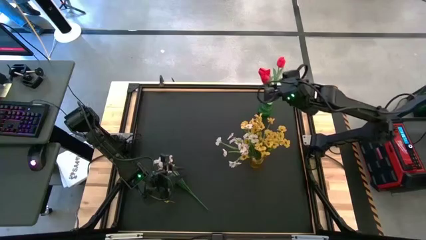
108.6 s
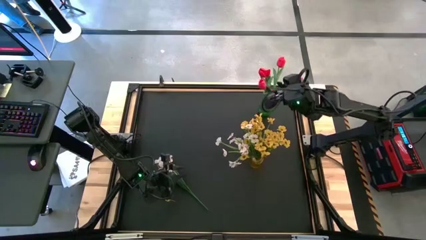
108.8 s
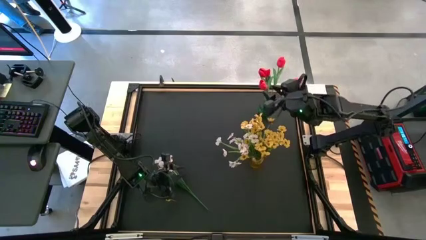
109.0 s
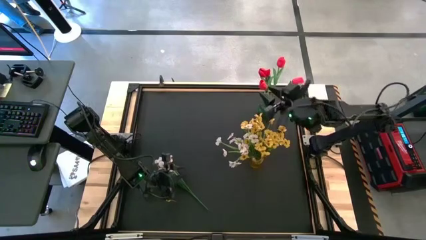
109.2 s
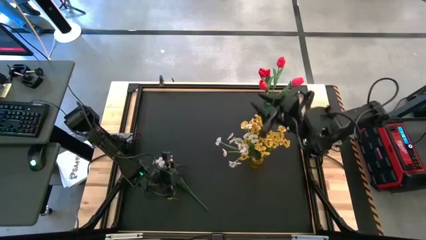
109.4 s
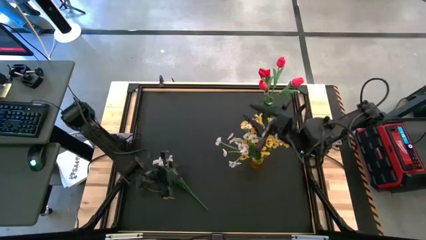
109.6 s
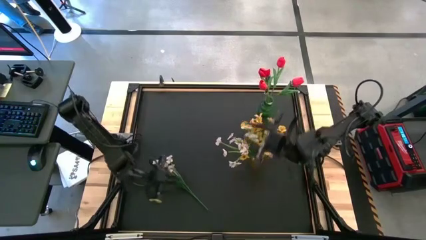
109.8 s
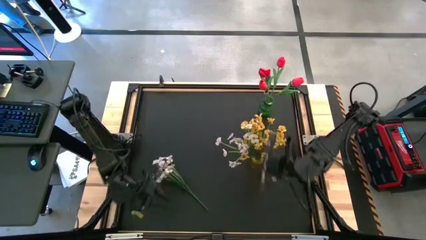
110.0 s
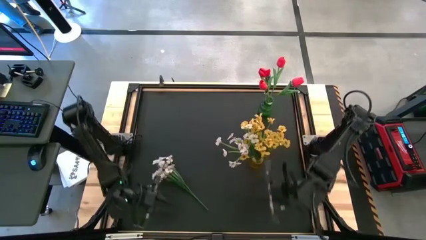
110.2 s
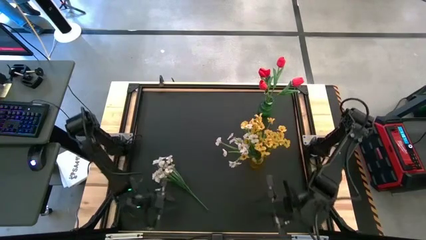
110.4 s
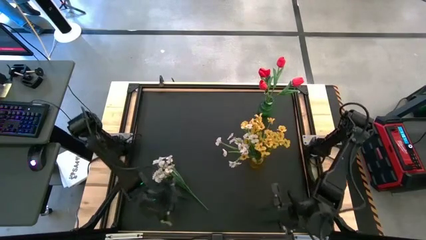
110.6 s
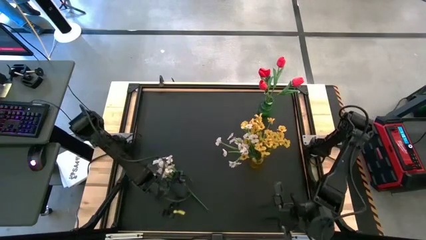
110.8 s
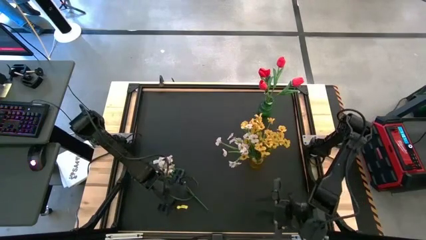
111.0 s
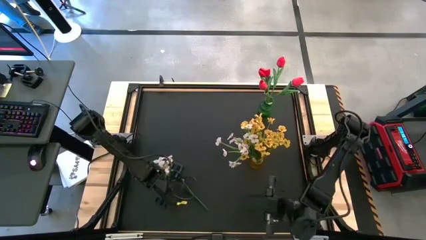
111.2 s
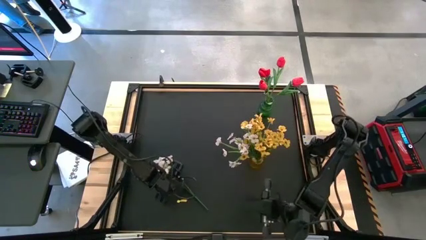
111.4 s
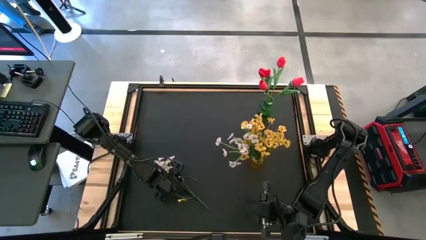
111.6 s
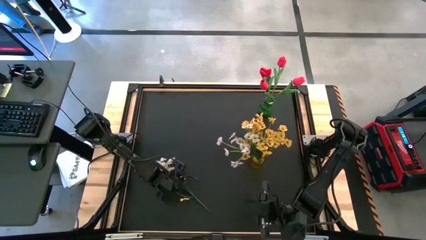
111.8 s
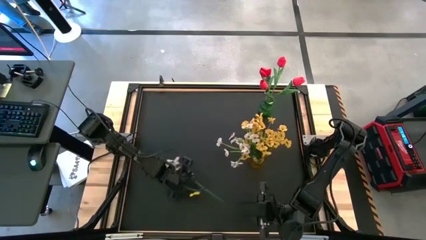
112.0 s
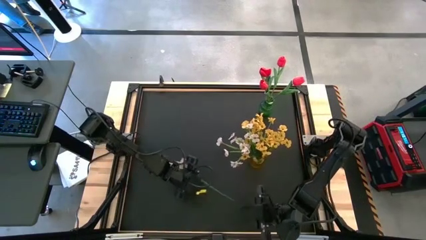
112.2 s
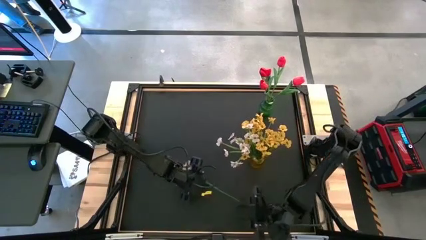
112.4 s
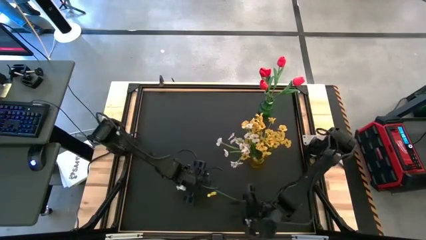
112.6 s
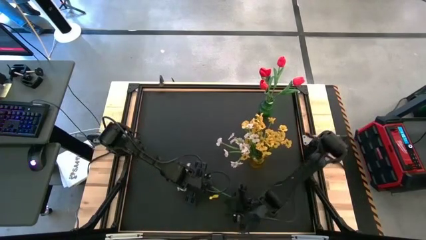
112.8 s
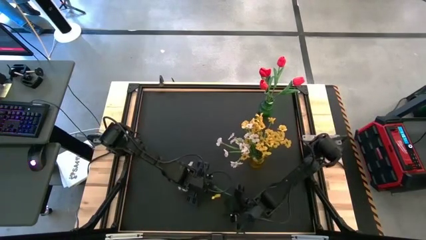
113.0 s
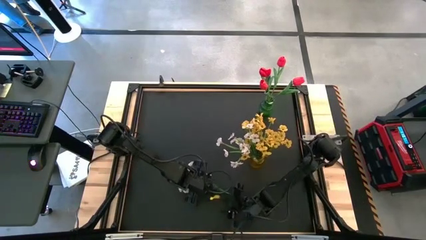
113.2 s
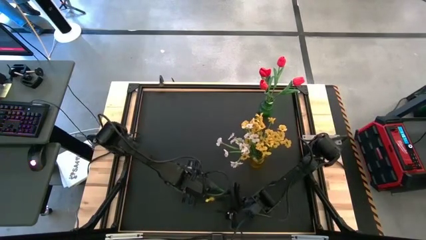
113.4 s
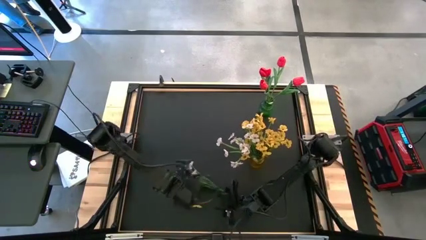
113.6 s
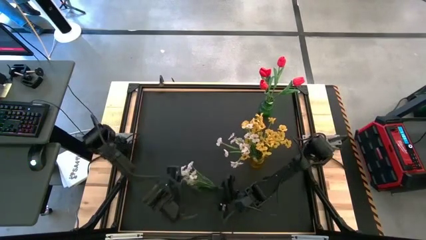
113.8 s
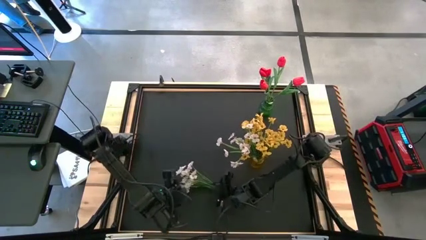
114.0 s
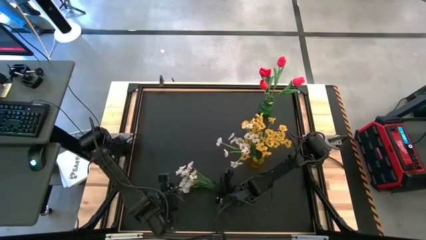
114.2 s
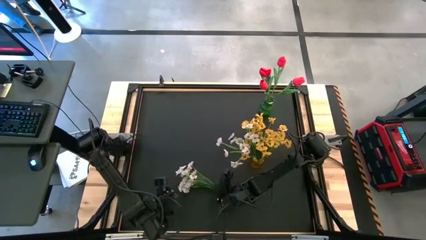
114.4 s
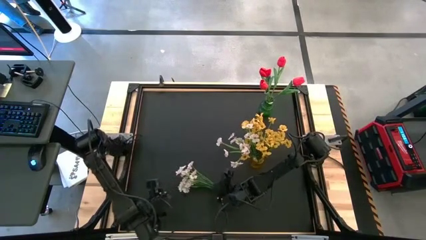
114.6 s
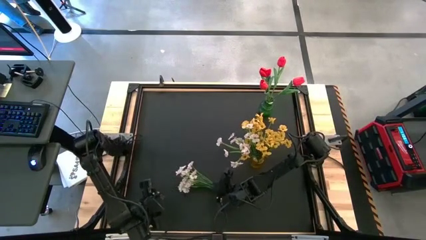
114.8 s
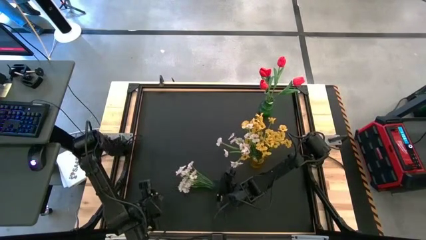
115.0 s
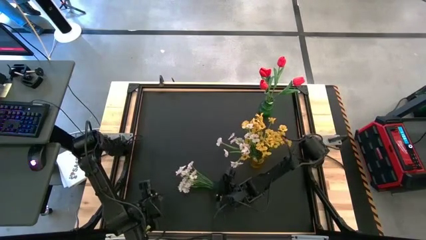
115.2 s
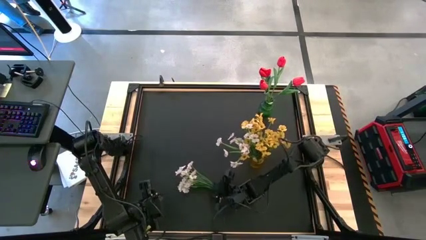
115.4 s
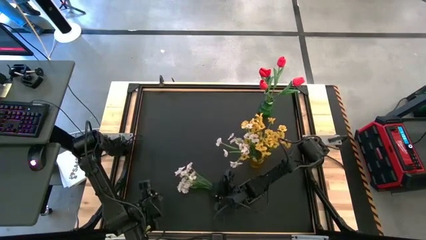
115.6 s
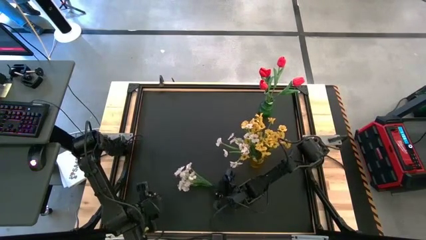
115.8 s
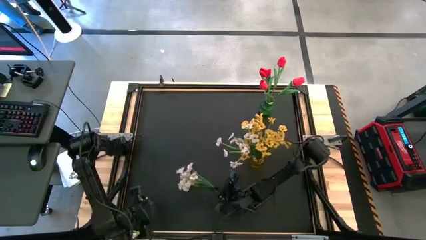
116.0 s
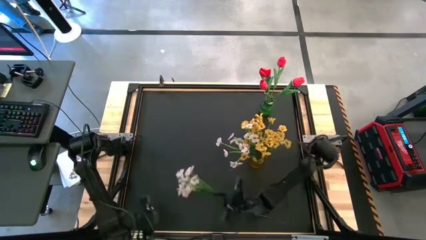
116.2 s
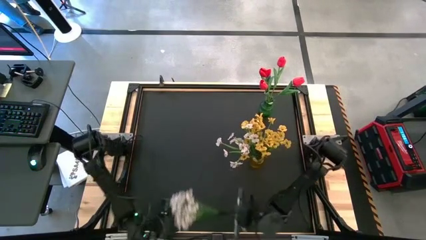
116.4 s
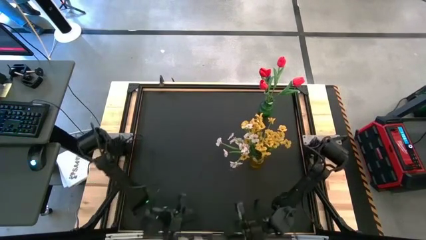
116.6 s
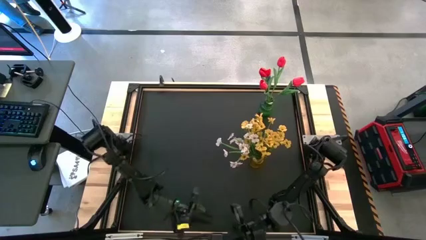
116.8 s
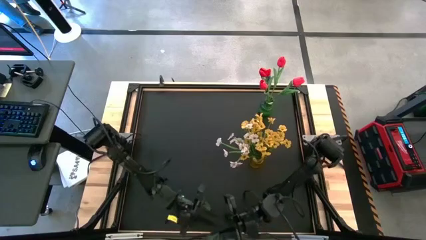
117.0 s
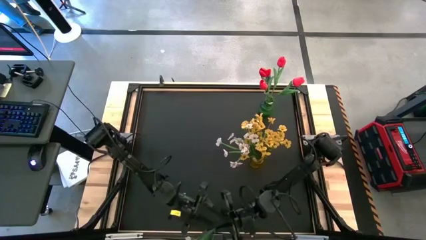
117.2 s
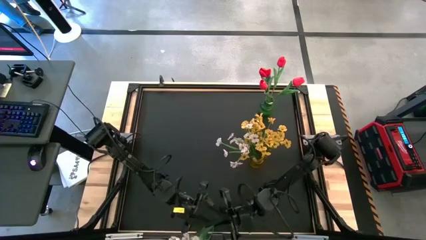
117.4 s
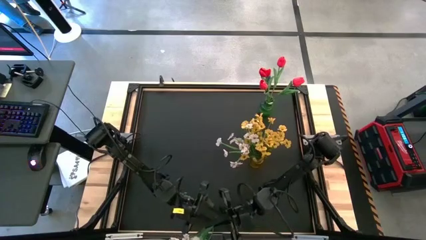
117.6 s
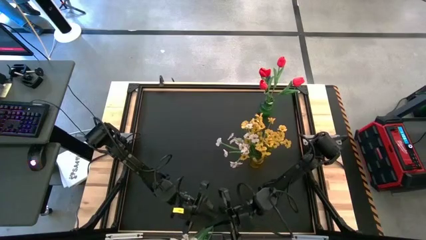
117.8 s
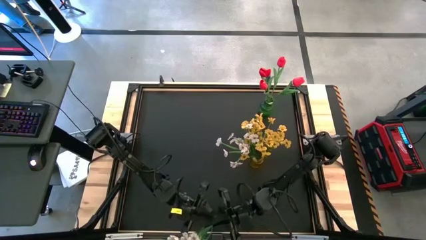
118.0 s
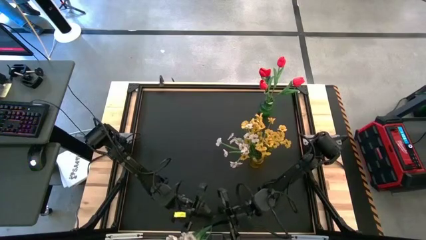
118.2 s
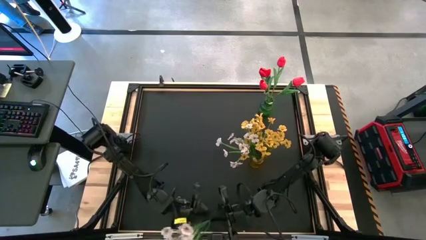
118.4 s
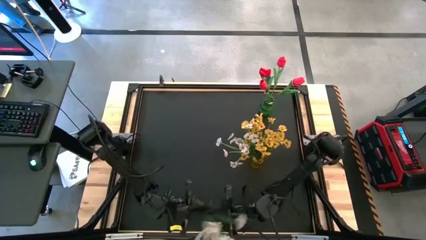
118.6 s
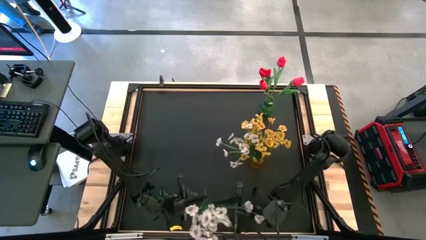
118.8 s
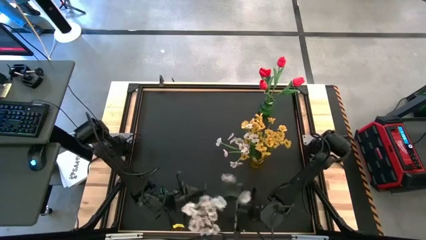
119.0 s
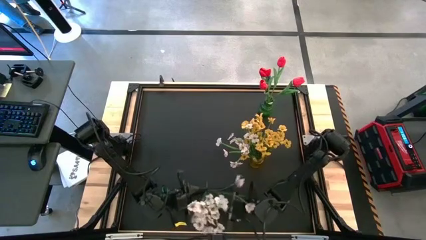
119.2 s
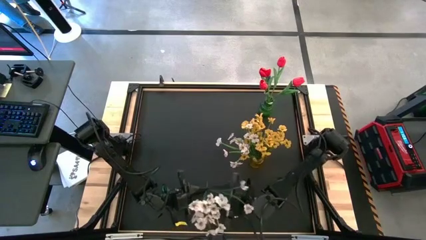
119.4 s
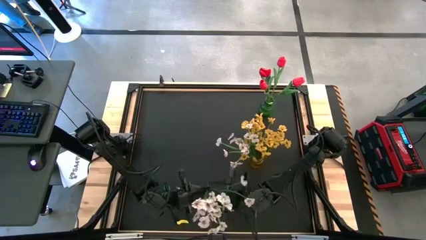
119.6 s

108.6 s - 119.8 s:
Task: Sort flowers into vase by color
Put the white flowers into the yellow vase

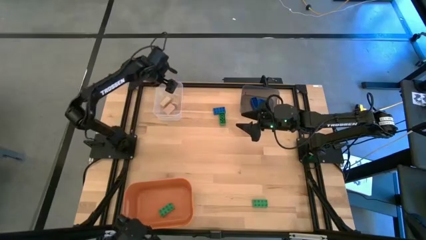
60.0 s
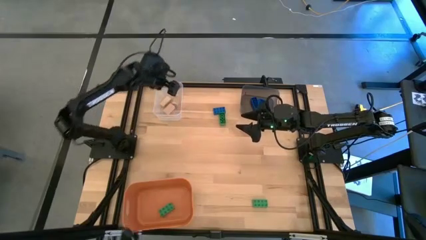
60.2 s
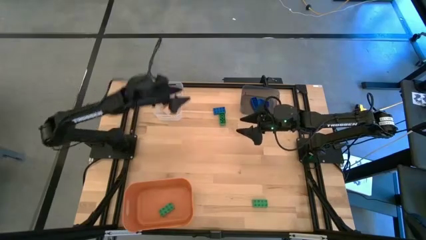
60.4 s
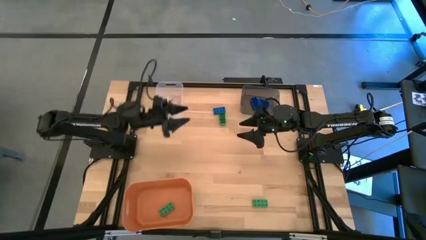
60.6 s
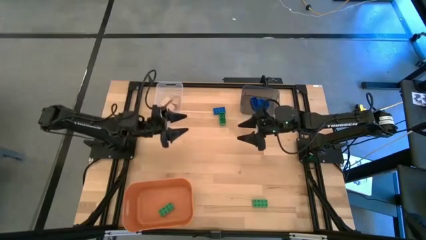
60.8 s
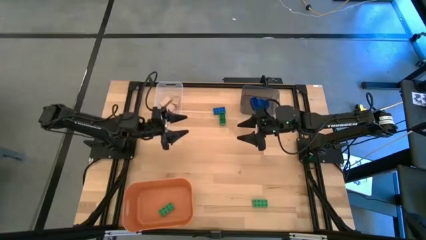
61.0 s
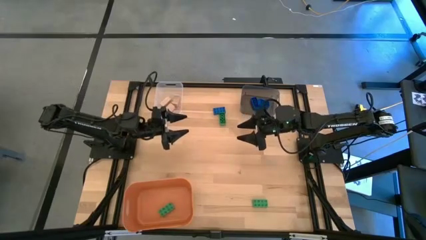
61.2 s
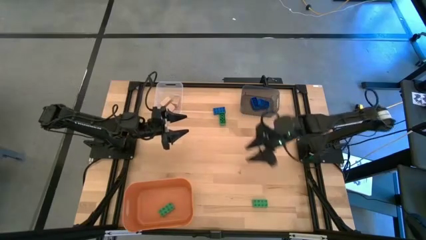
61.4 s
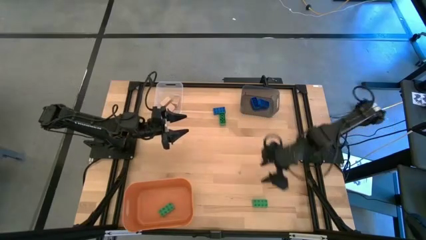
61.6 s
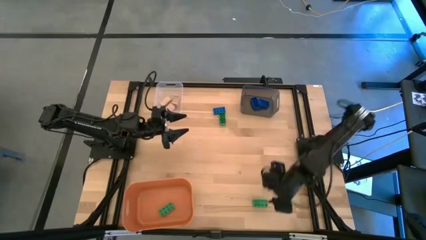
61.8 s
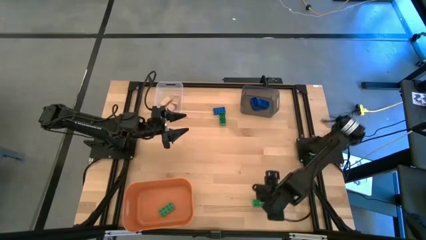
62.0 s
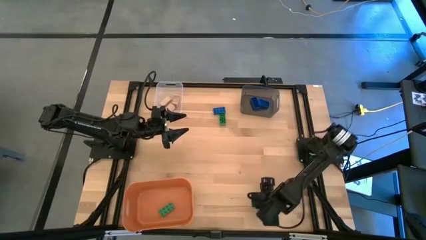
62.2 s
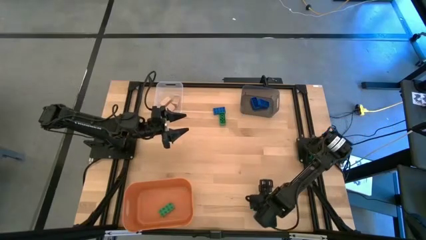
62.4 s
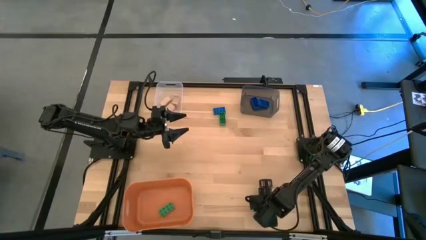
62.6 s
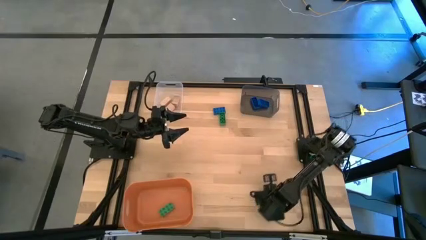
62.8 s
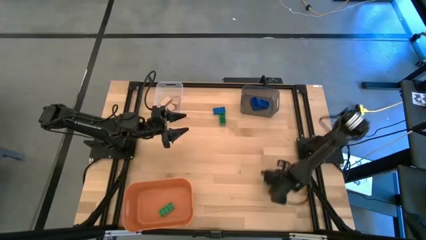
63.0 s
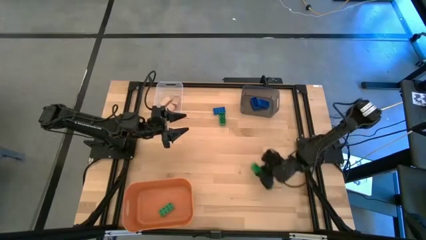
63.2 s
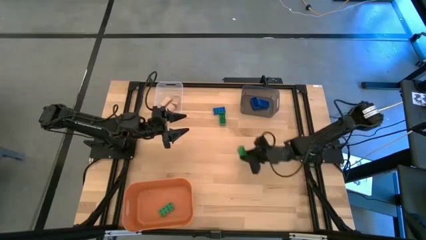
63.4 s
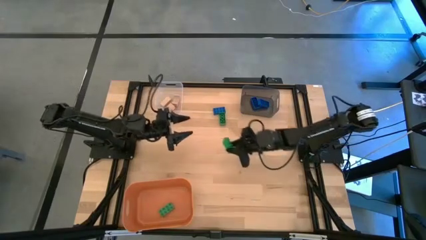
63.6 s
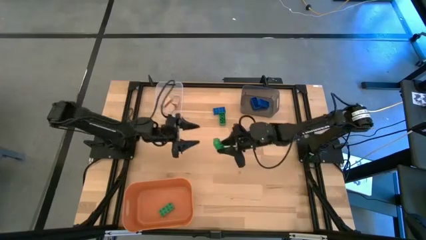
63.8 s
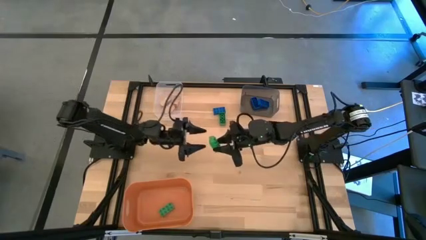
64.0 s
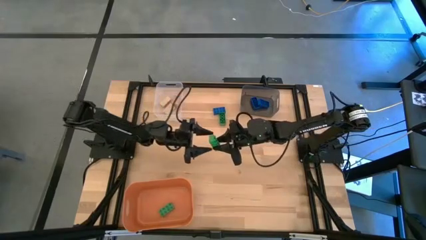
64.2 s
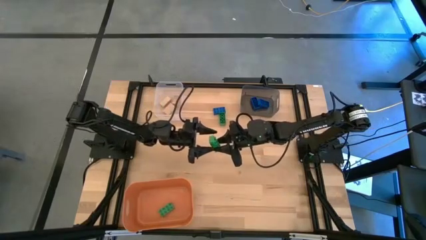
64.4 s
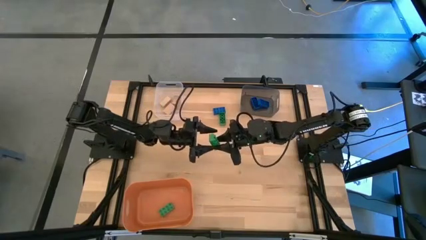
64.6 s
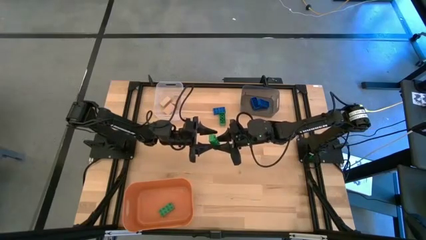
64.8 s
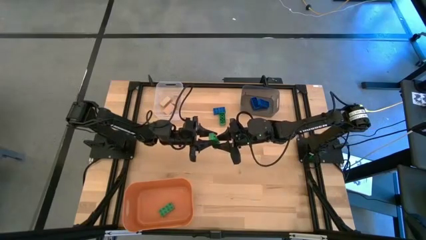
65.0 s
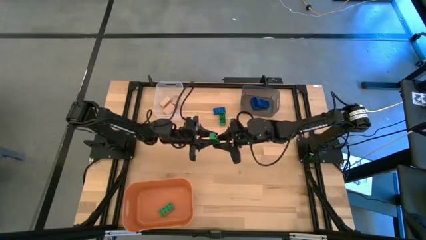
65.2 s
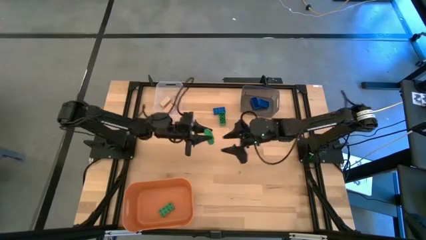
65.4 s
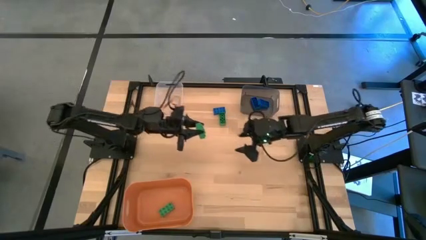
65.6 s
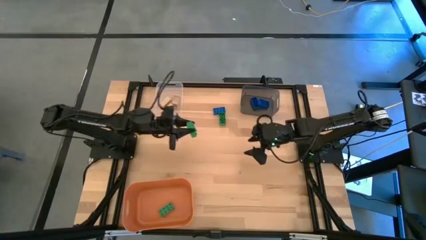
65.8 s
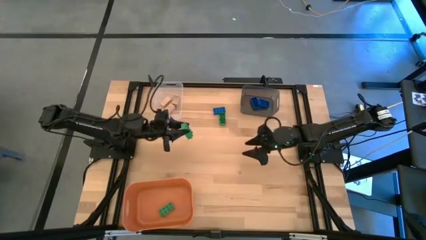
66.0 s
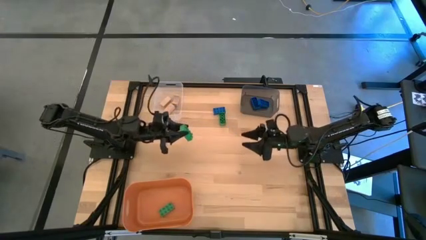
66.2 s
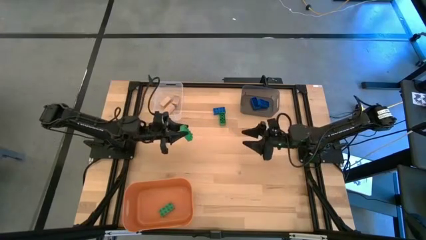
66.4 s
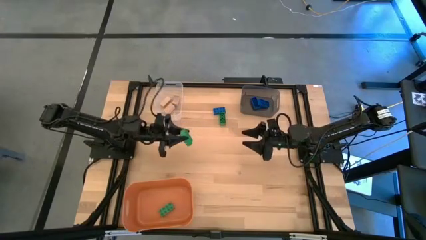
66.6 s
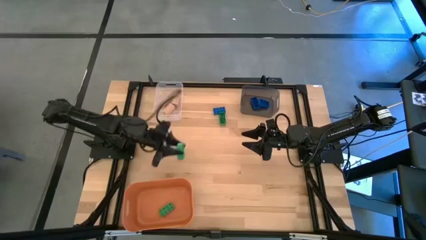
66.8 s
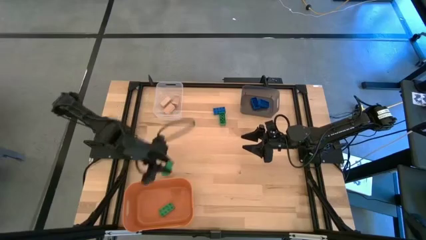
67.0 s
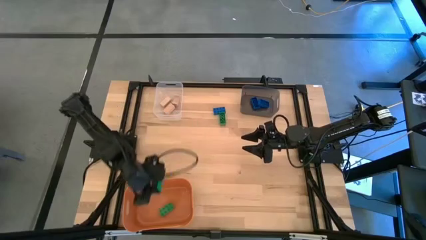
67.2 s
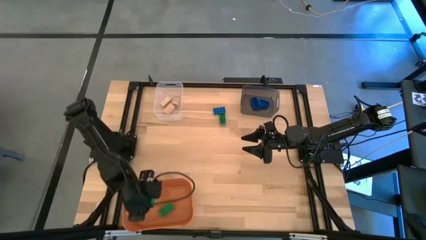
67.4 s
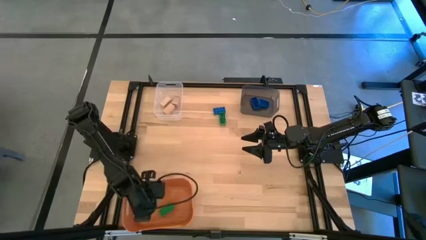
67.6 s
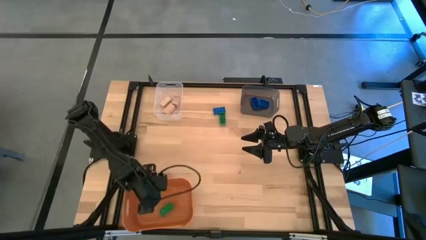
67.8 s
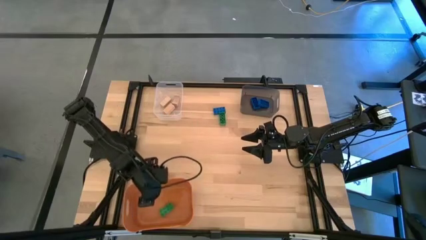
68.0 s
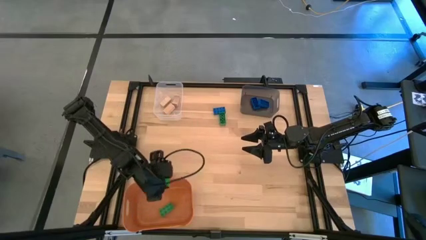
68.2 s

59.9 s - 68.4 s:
Task: Sort & place blocks by color
Put the bottom green game piece into the orange bin
